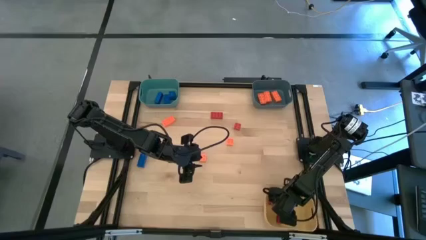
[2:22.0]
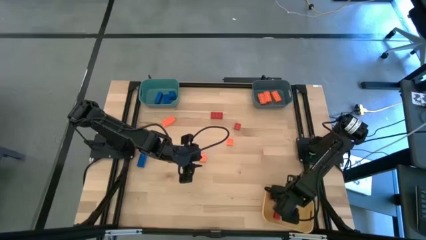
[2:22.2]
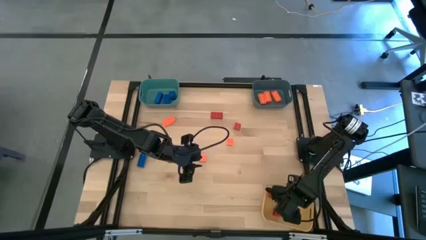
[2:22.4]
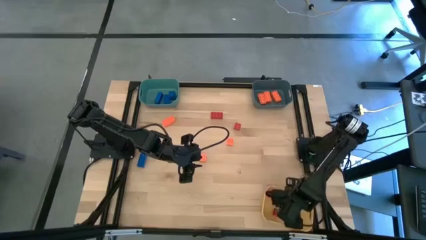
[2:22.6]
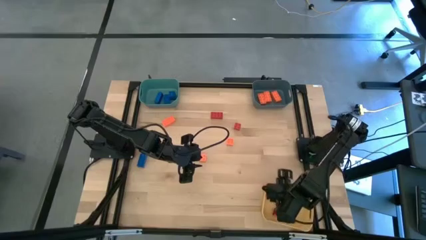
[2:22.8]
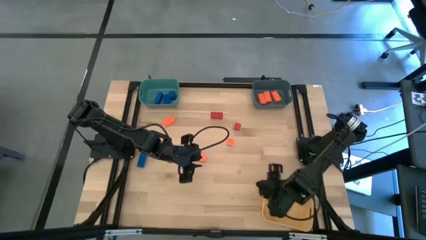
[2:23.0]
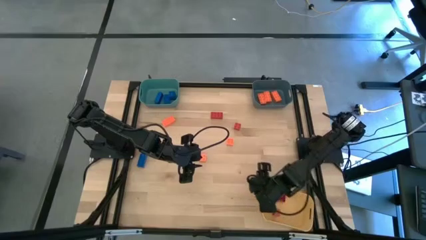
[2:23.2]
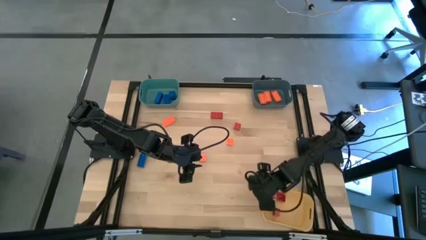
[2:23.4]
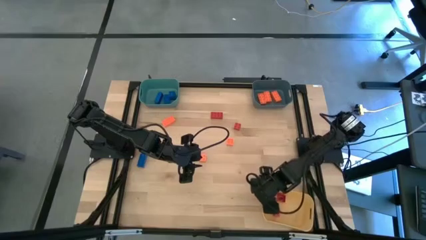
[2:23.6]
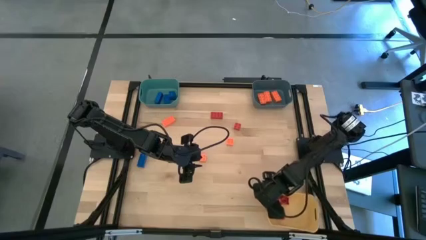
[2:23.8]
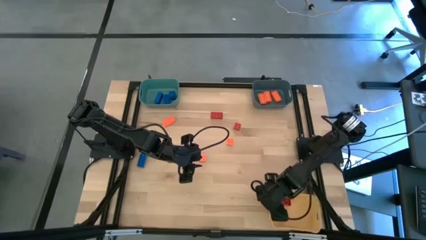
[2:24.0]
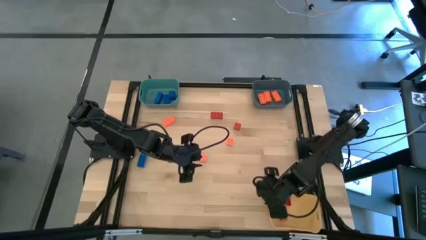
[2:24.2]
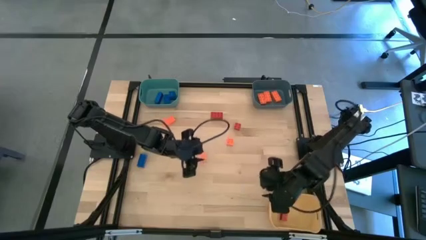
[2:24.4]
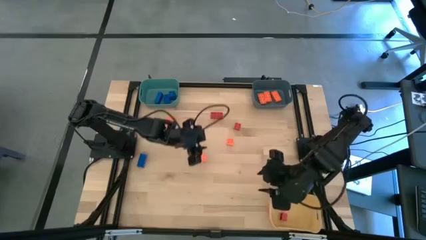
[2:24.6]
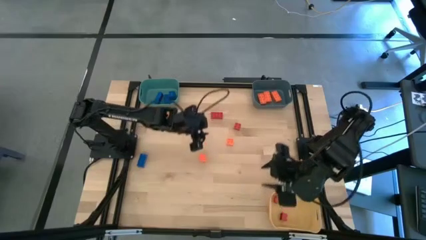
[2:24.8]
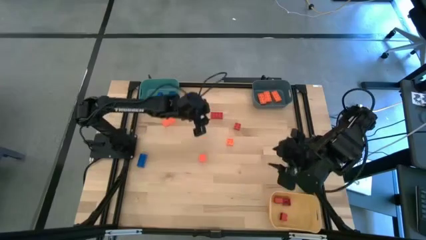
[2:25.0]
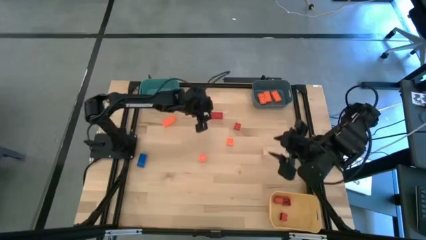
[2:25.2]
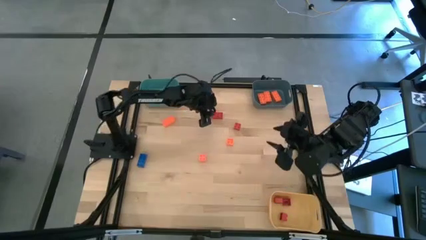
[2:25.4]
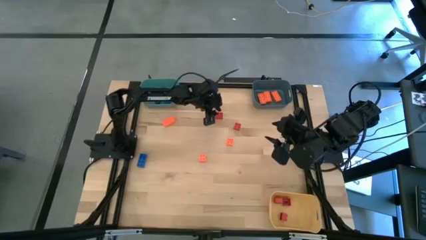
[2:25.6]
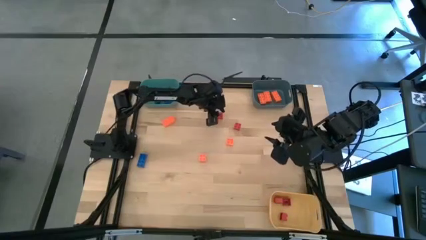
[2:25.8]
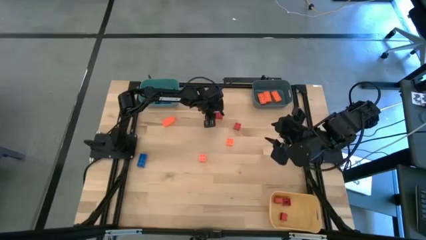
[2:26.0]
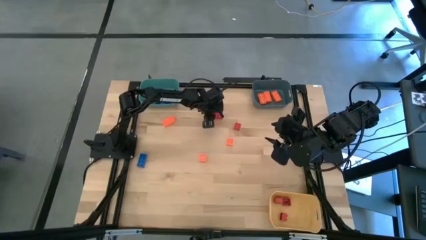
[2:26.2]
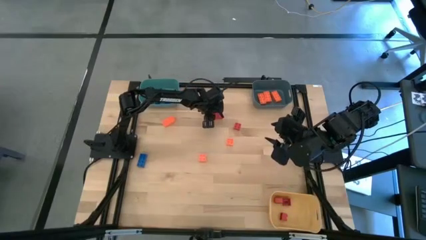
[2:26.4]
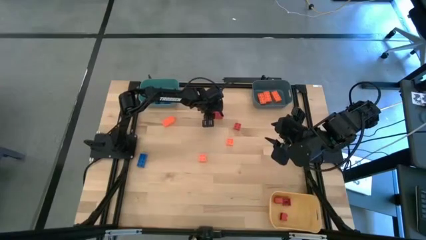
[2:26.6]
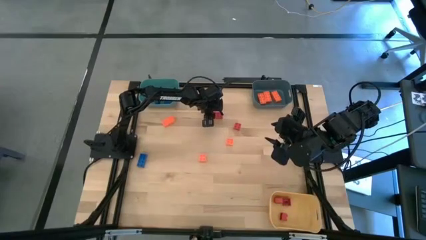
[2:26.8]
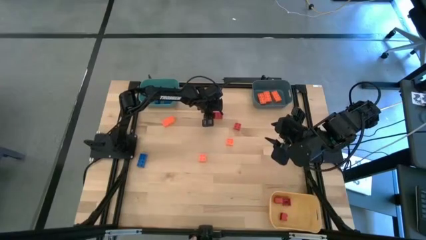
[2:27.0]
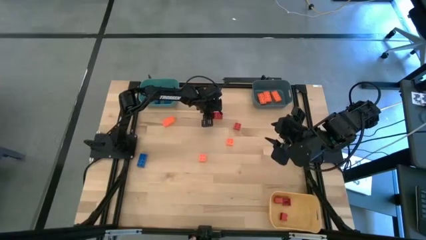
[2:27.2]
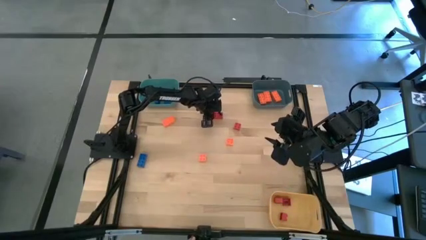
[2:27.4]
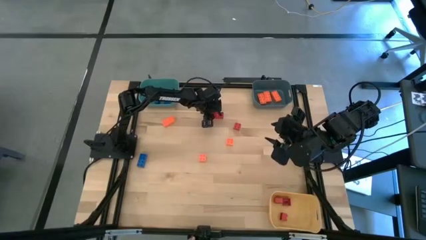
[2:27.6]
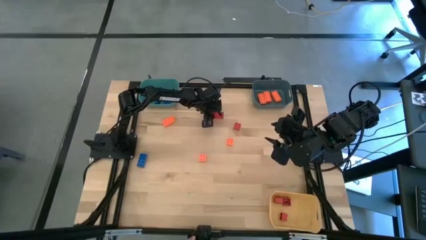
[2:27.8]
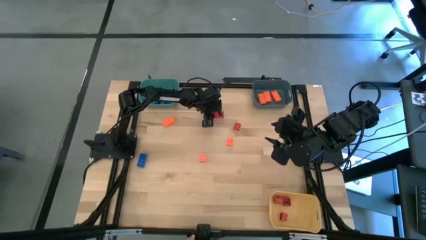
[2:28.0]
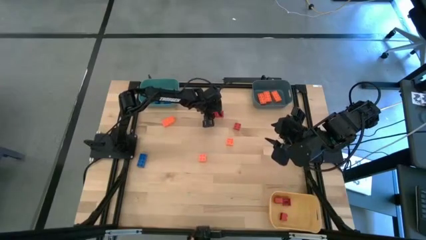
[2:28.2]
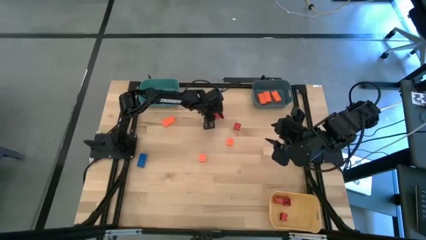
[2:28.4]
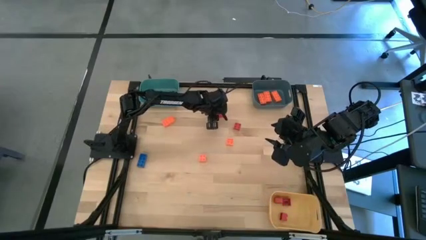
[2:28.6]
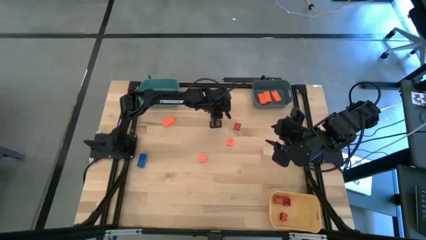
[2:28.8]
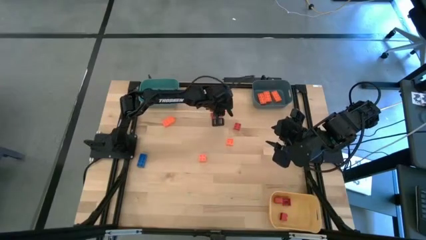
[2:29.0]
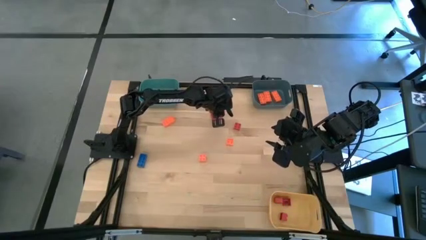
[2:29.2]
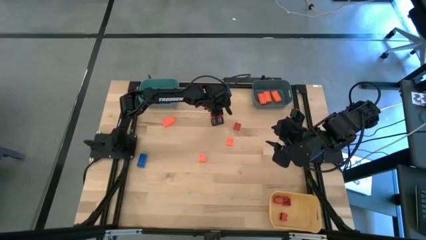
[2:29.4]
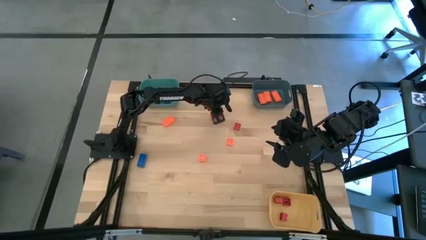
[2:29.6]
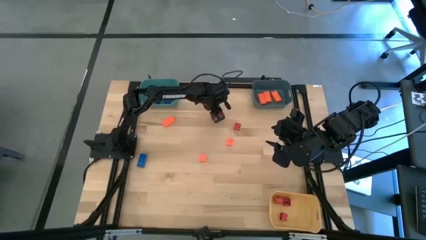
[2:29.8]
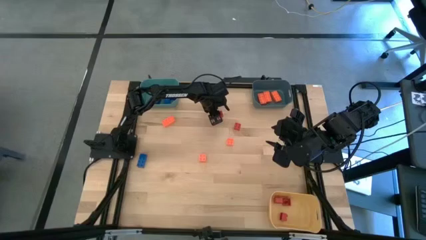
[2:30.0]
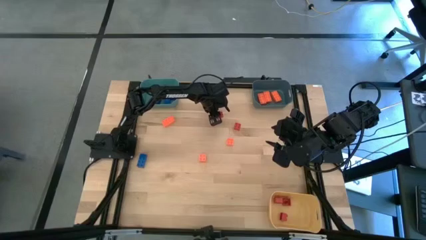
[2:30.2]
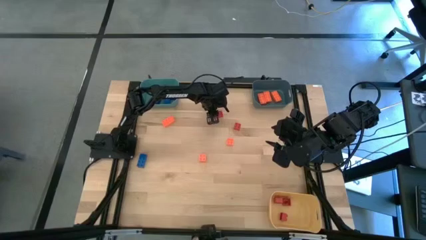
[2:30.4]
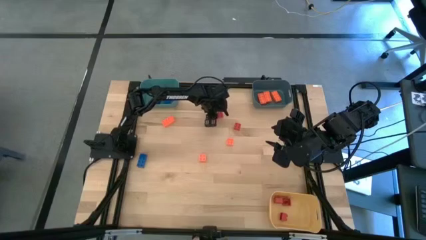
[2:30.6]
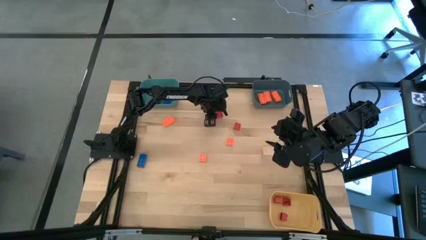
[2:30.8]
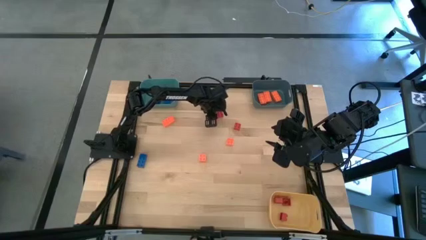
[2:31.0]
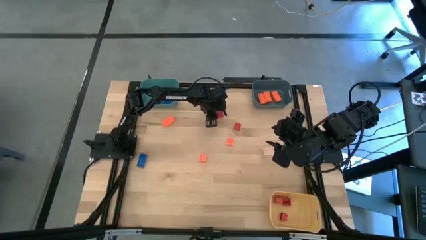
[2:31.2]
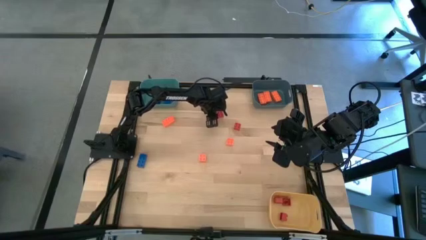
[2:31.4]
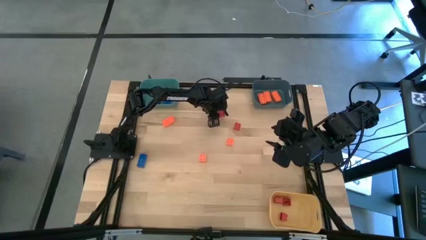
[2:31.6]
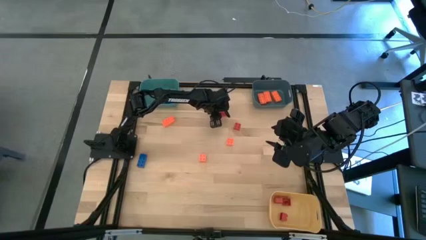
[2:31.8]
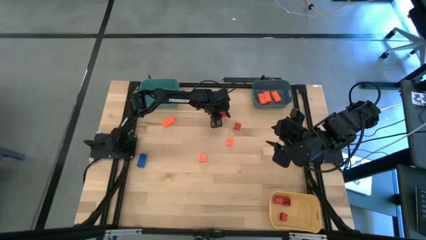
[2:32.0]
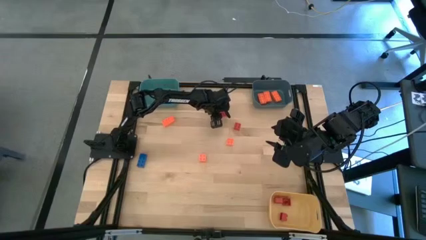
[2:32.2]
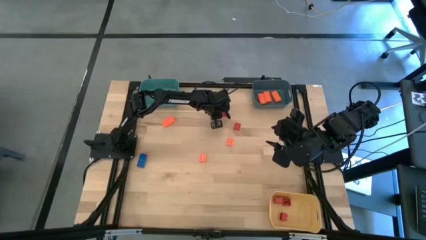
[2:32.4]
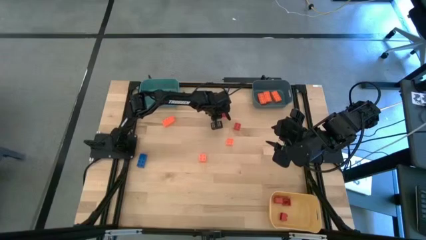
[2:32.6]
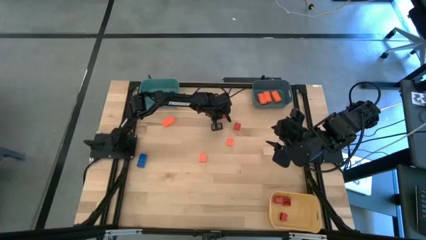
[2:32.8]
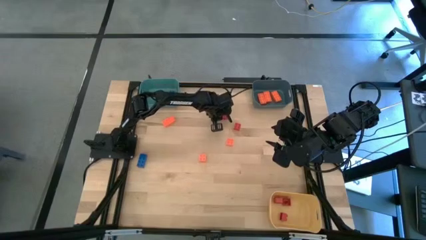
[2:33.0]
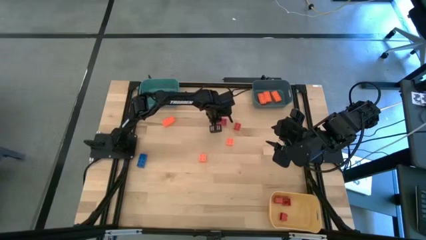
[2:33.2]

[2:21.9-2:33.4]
Task: Sort & place blocks by color
Put the red game piece into the yellow bin
